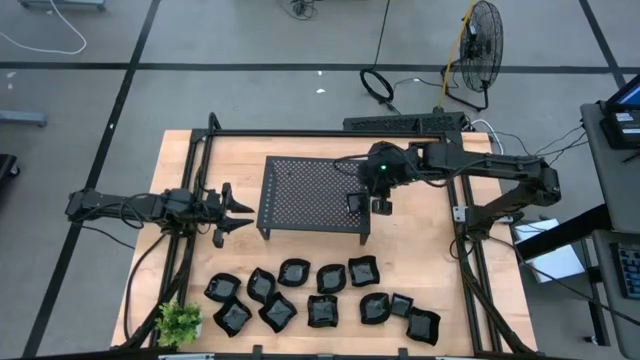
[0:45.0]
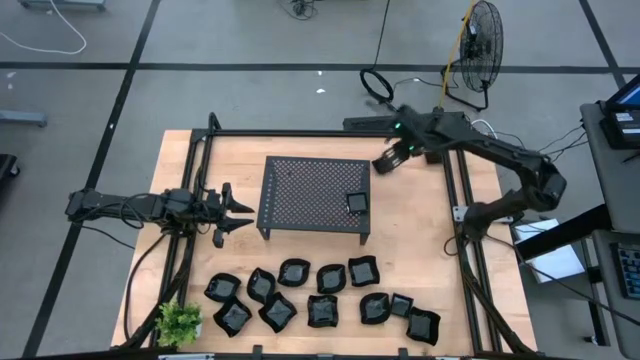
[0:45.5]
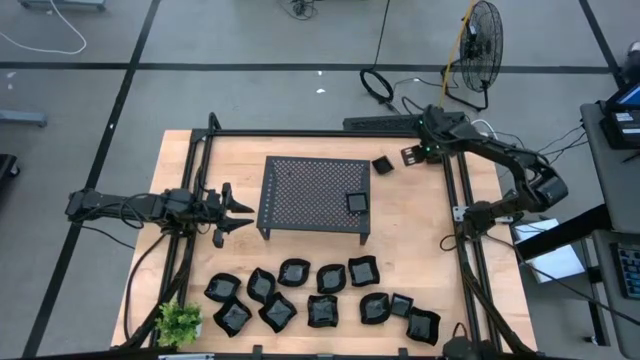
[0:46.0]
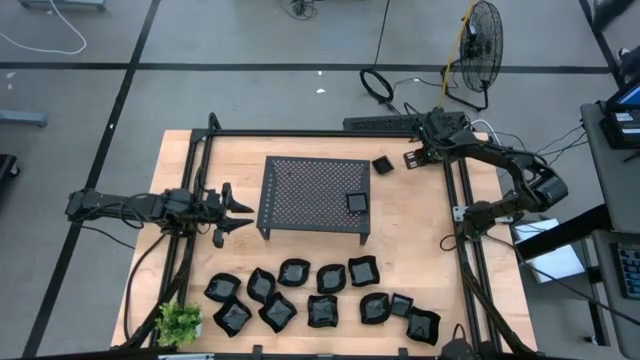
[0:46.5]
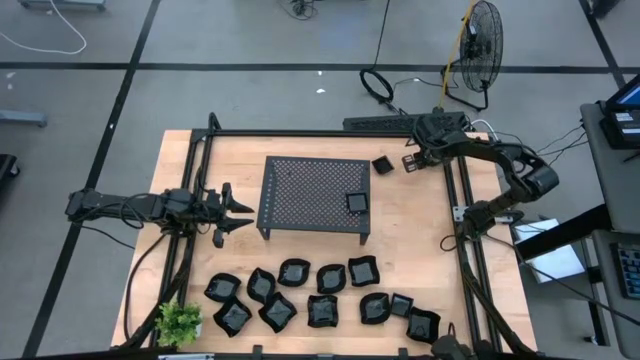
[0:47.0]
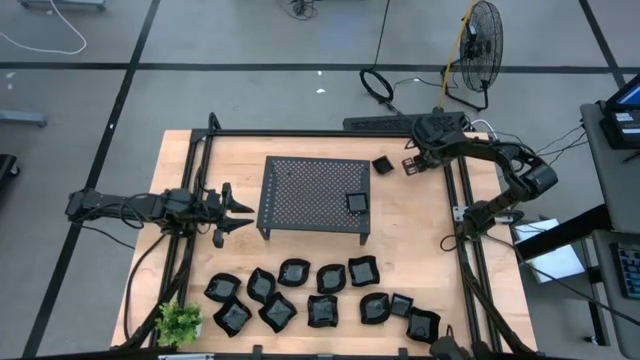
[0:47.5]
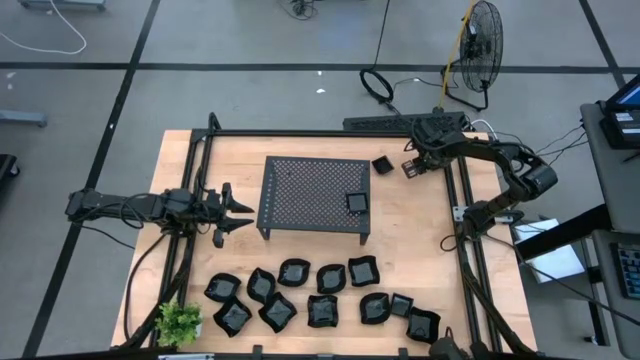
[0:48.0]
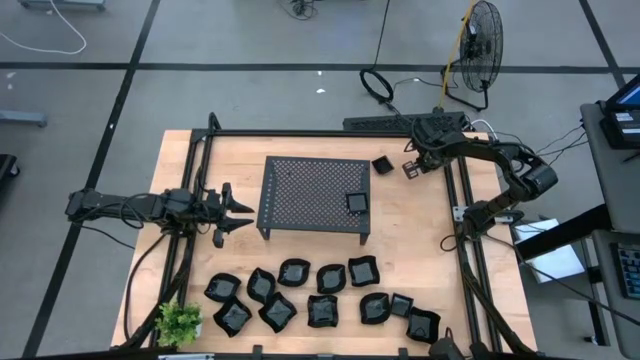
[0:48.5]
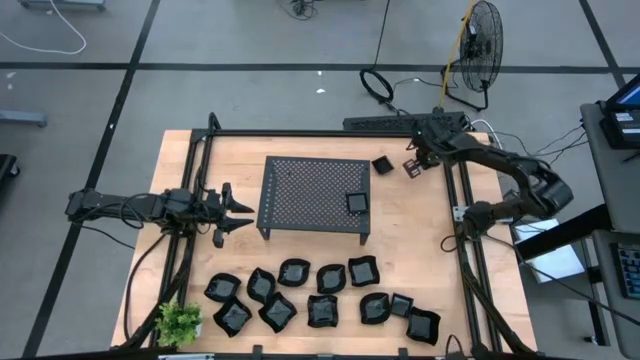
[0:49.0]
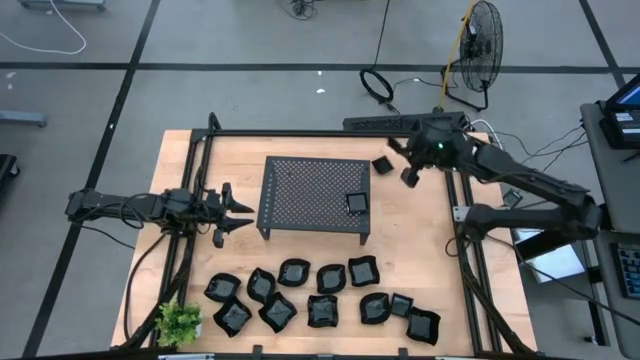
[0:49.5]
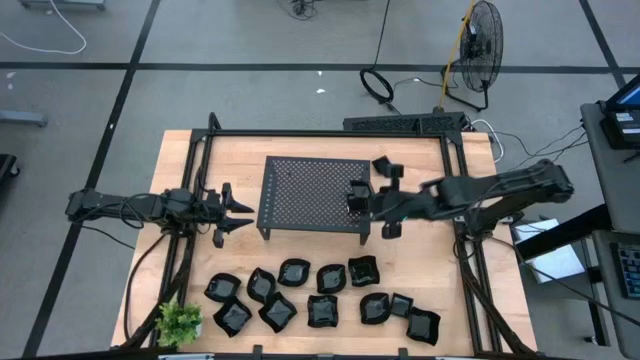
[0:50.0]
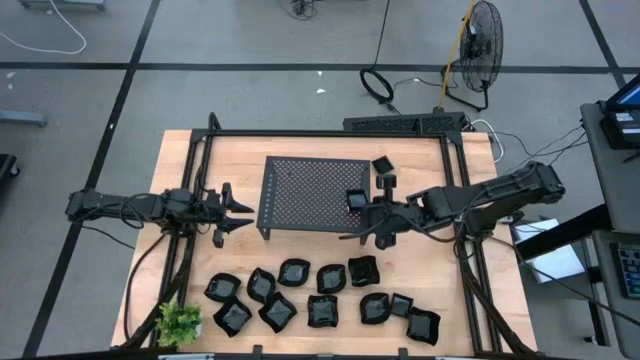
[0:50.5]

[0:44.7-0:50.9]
Task: Pick & Place Mini shaped plates
Stack the square plate onto the stacked square plate on the shelf

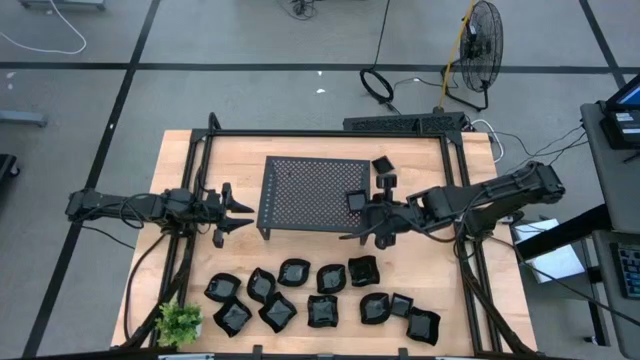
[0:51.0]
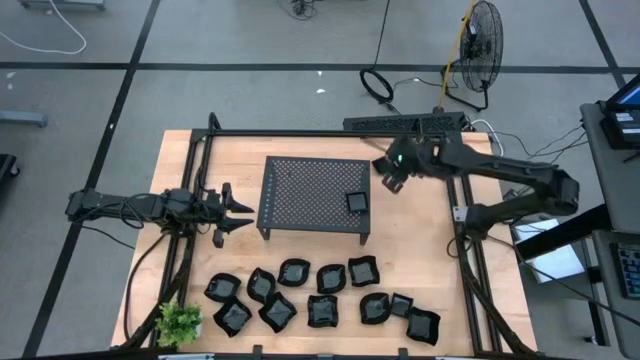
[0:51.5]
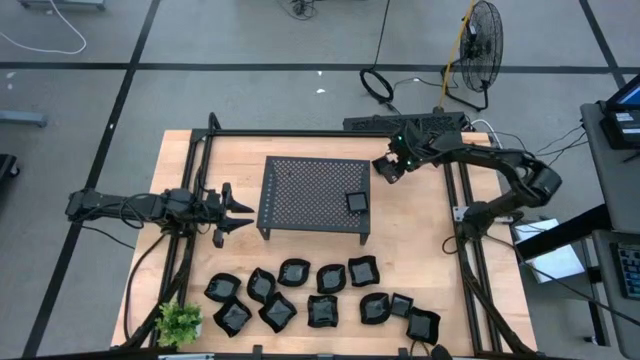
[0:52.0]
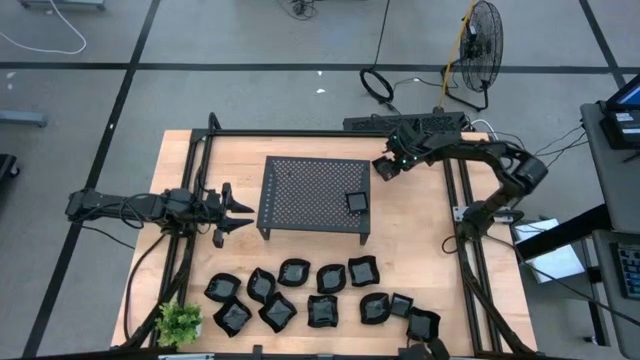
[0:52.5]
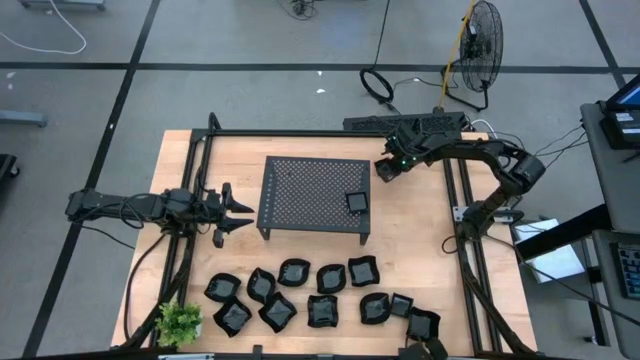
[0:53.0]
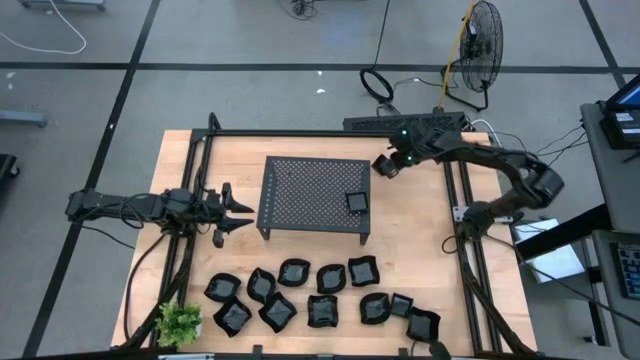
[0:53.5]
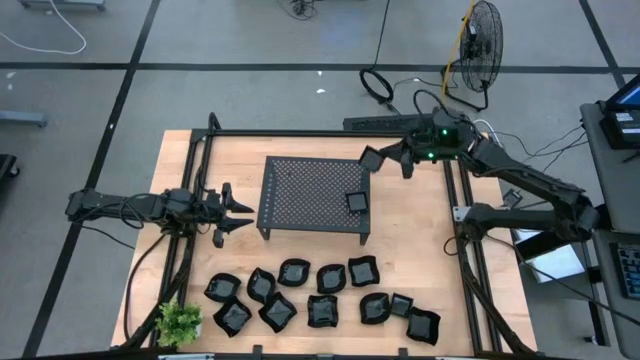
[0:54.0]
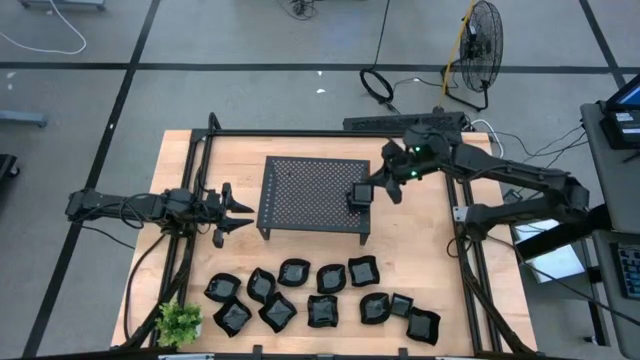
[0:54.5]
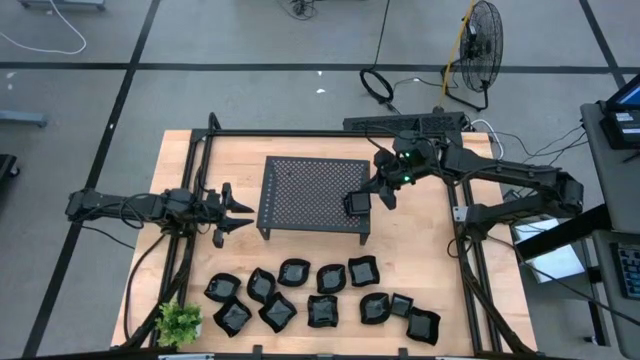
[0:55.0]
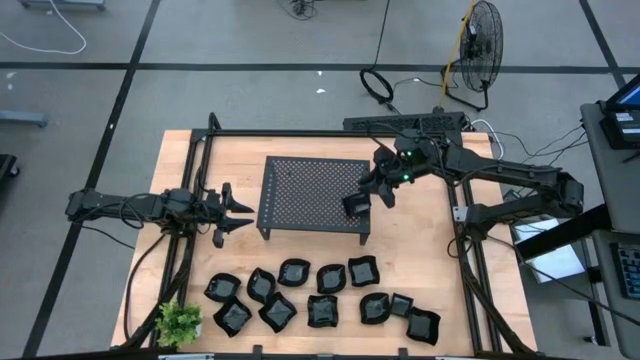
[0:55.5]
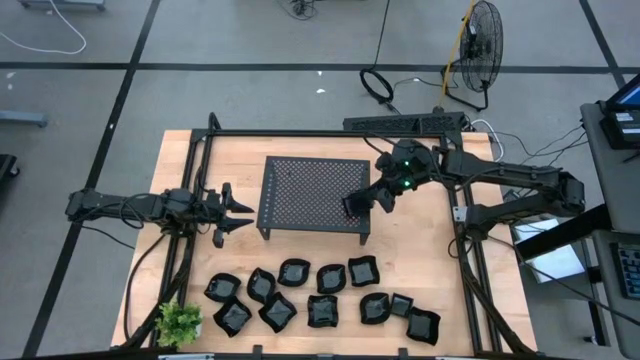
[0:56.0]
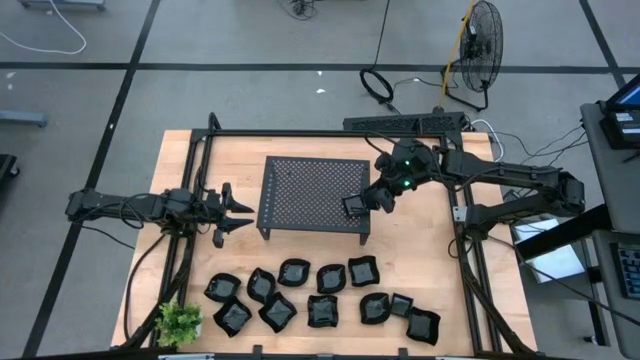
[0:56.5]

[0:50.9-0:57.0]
Stack the square plate onto the stacked square plate on the shelf

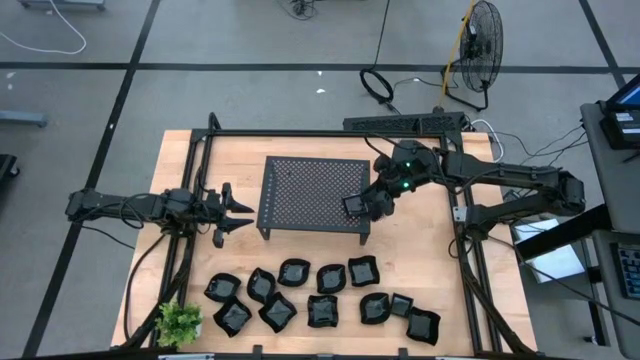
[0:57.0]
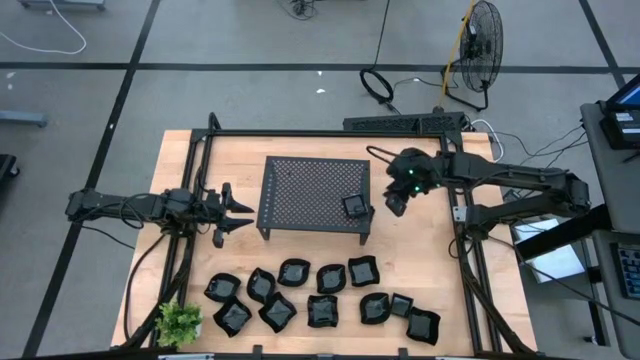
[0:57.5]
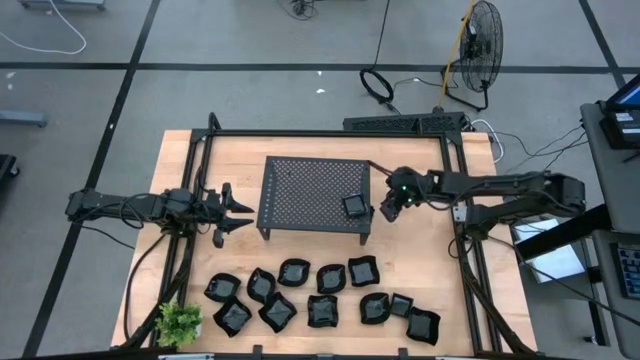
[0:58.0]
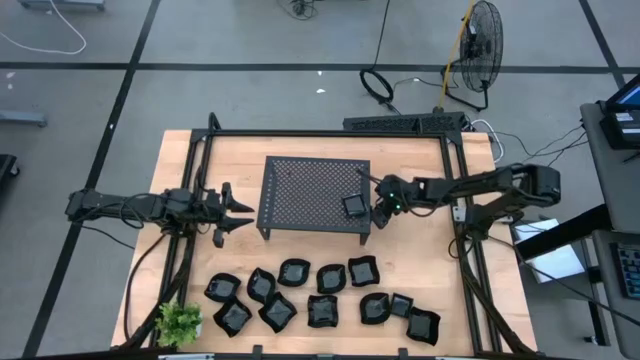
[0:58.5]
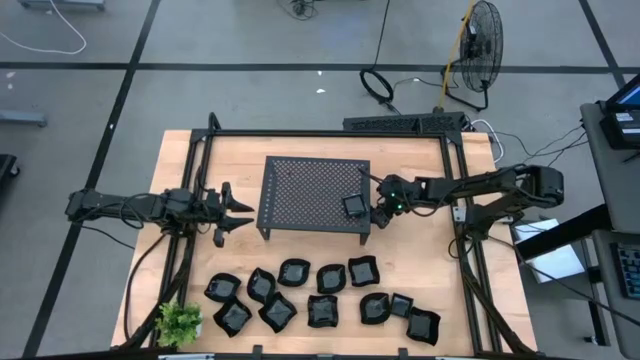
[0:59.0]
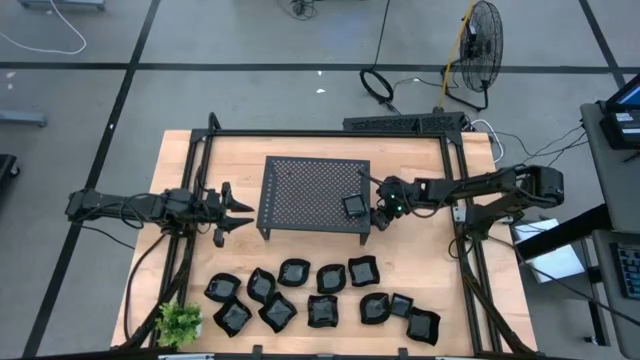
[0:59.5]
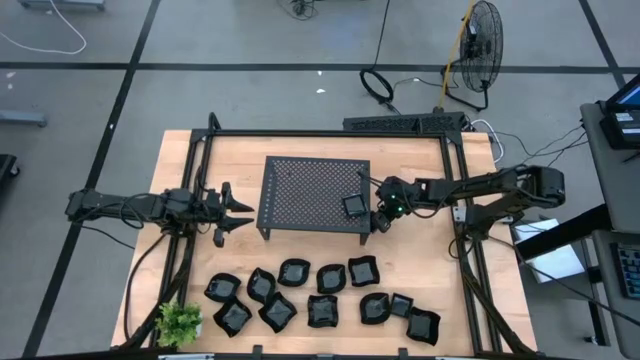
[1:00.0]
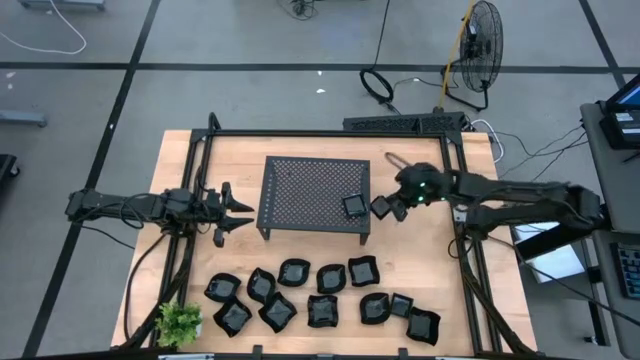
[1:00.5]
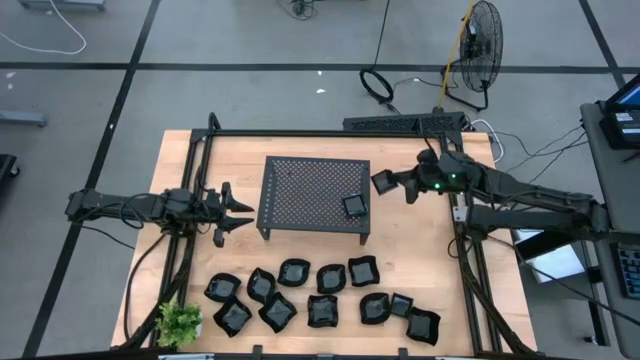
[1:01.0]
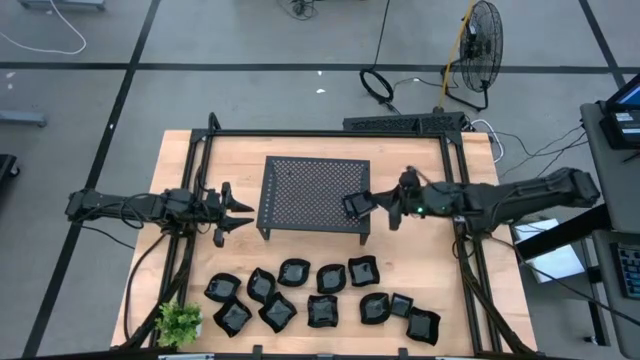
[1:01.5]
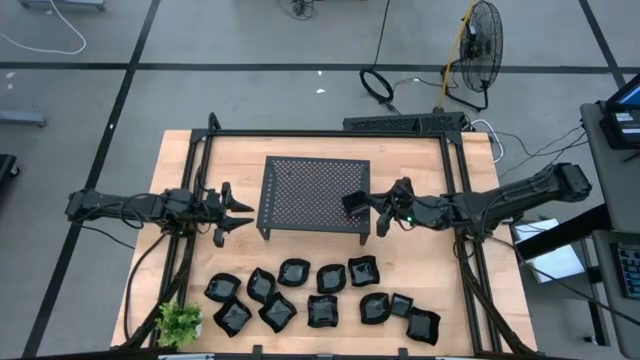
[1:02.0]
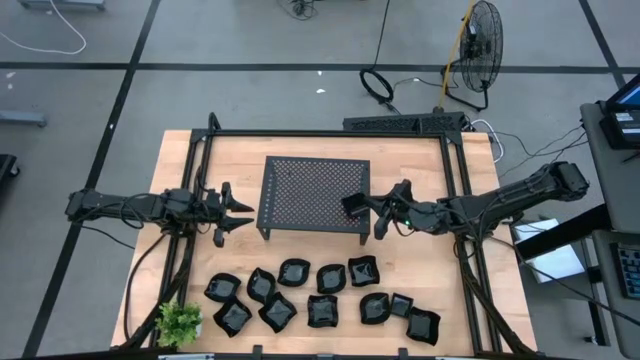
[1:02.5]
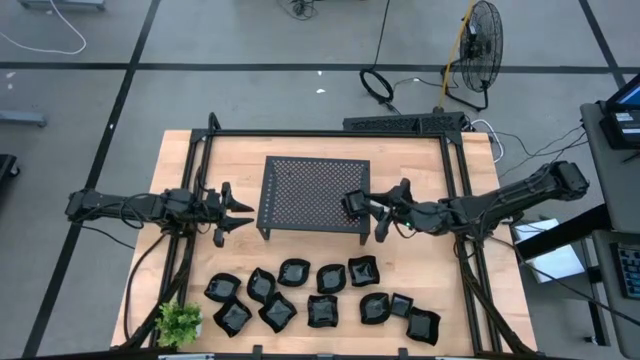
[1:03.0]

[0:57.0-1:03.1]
Stack the square plate onto the stacked square plate on the shelf

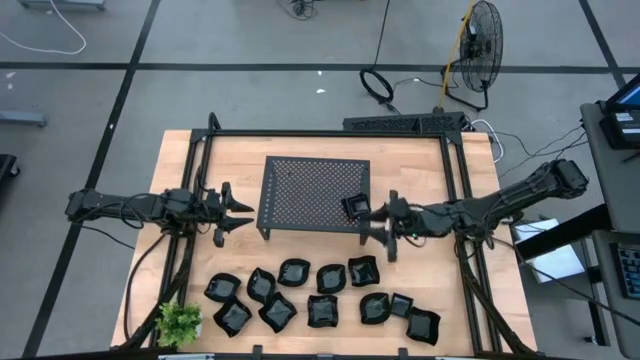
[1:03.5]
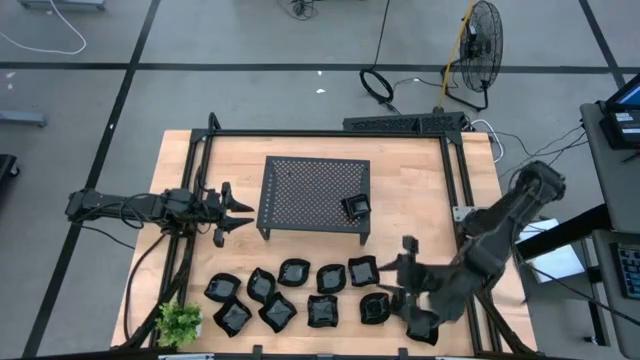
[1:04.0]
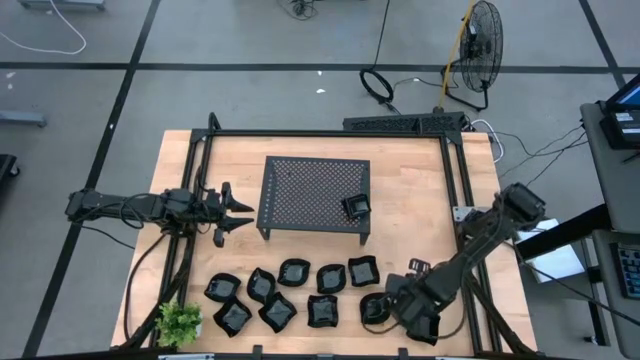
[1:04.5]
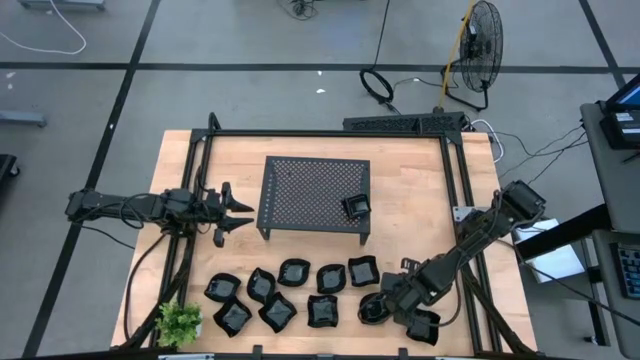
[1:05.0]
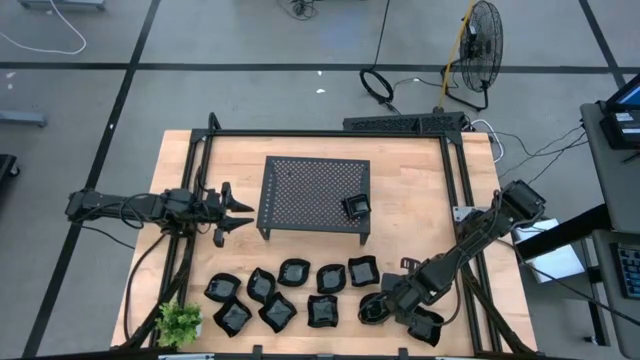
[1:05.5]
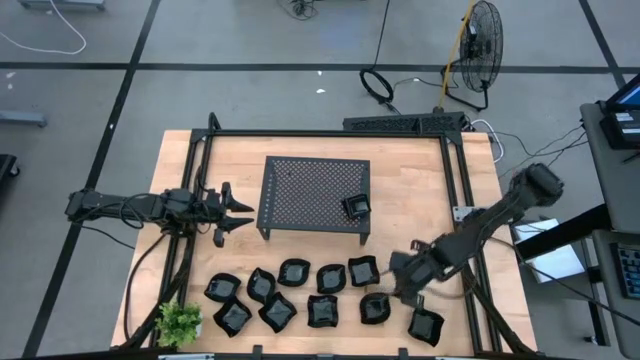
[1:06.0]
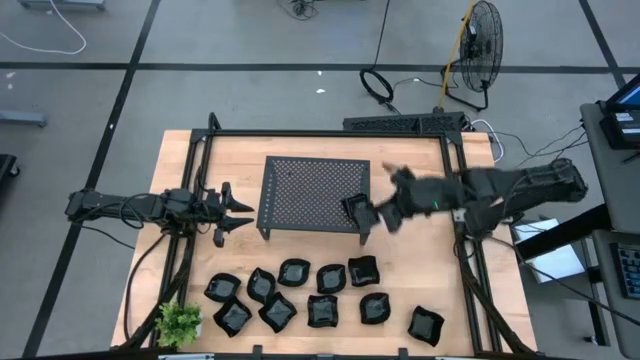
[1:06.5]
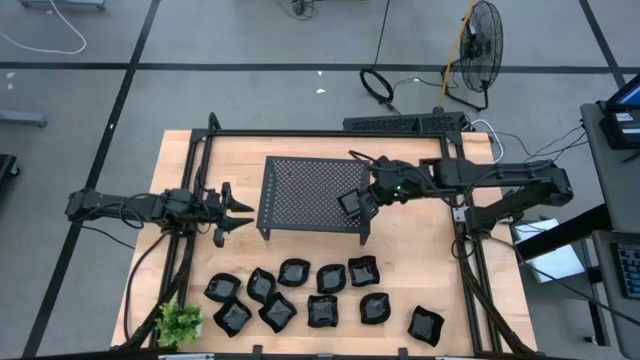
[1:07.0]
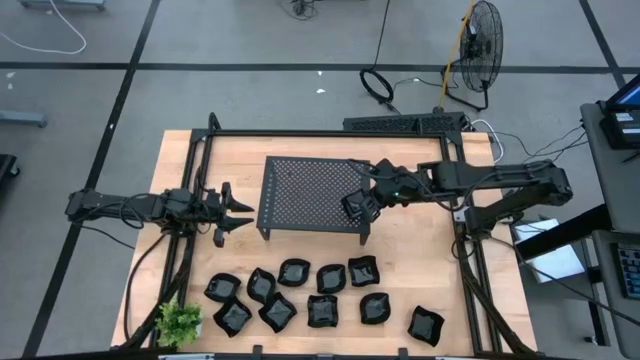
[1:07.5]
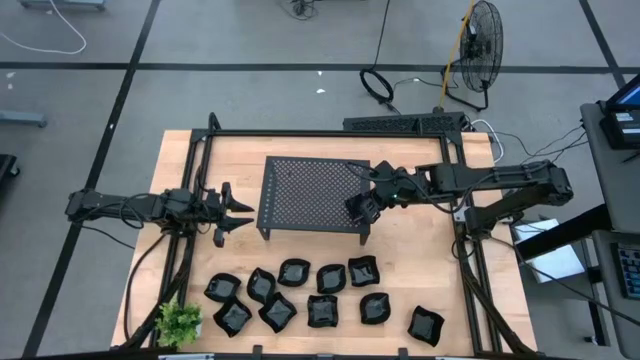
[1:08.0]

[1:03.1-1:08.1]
Stack the square plate onto the stacked square plate on the shelf
